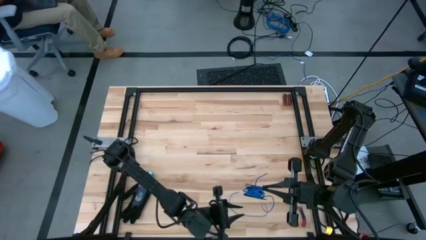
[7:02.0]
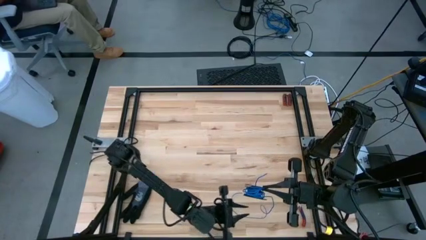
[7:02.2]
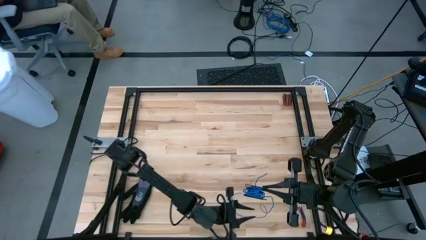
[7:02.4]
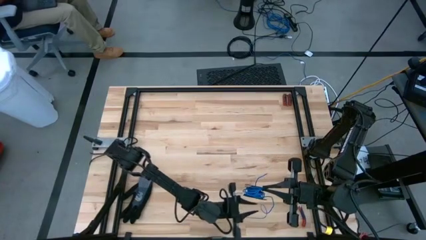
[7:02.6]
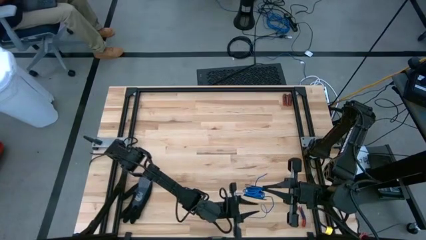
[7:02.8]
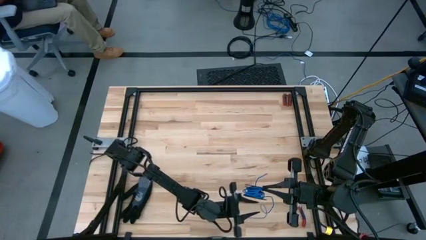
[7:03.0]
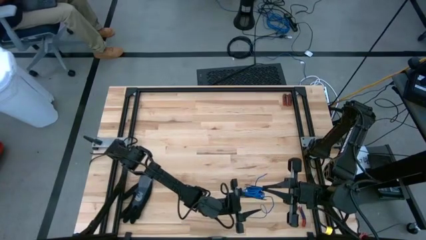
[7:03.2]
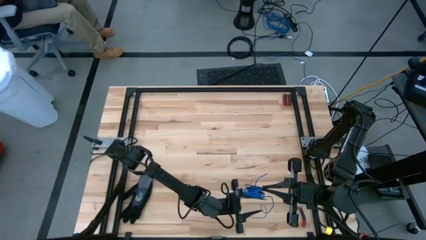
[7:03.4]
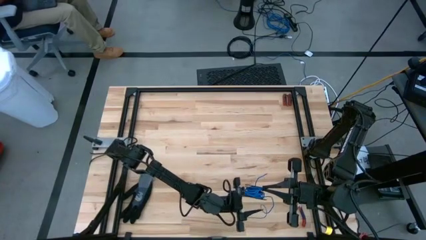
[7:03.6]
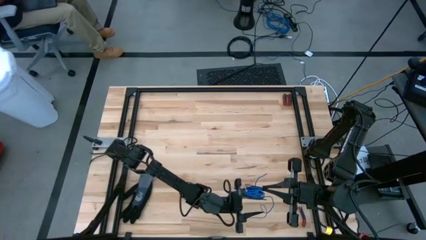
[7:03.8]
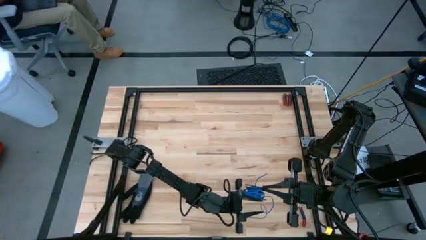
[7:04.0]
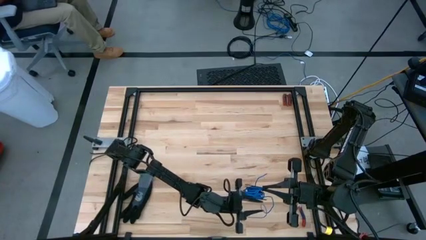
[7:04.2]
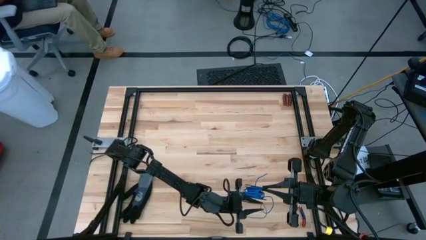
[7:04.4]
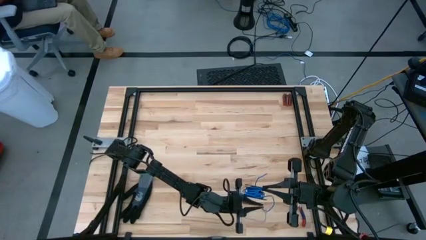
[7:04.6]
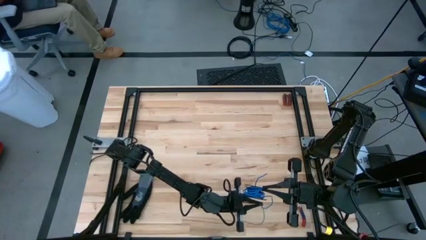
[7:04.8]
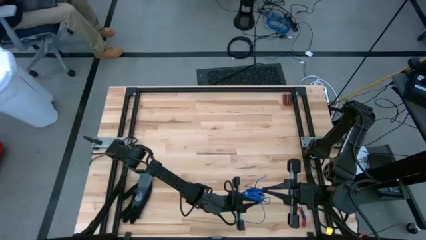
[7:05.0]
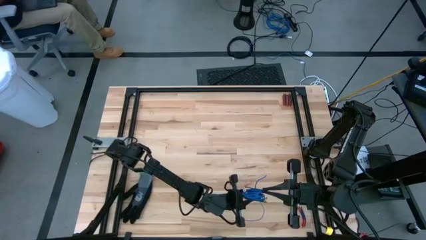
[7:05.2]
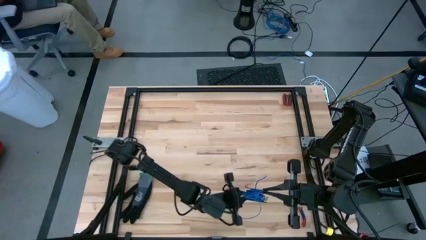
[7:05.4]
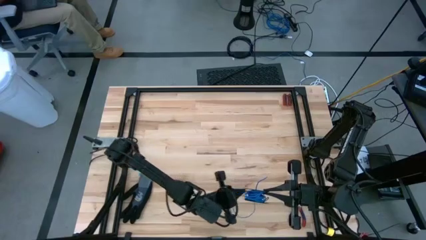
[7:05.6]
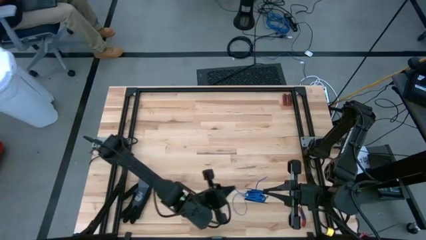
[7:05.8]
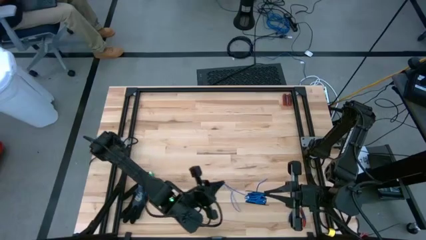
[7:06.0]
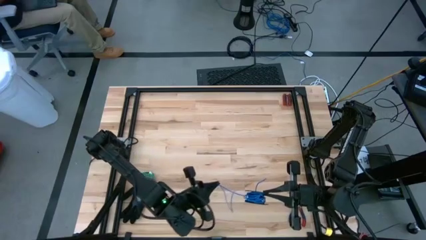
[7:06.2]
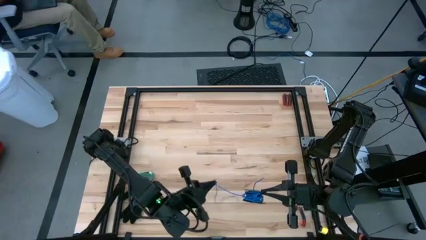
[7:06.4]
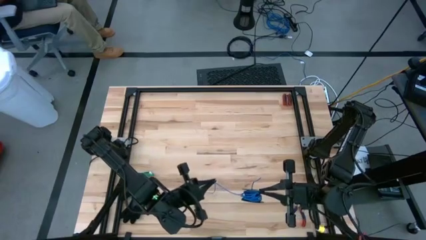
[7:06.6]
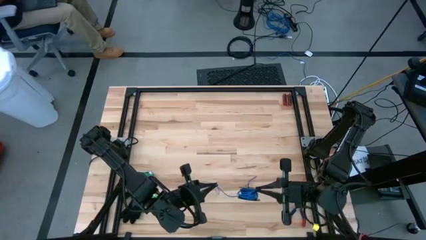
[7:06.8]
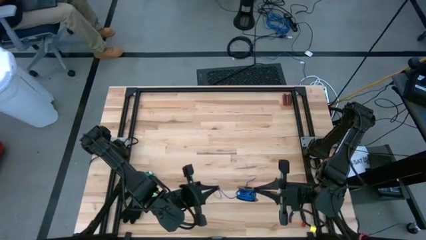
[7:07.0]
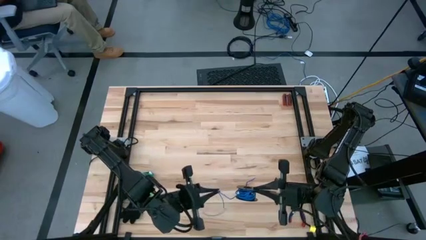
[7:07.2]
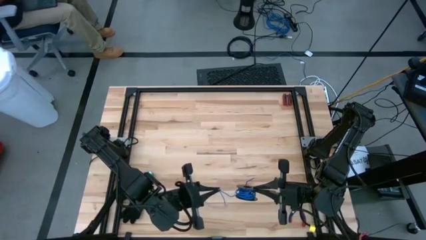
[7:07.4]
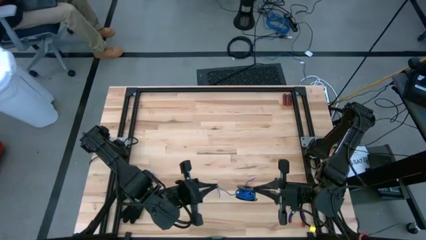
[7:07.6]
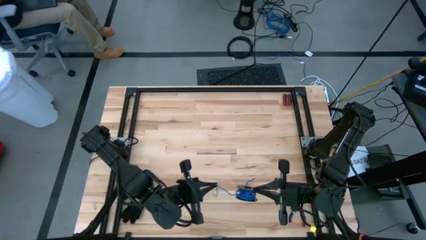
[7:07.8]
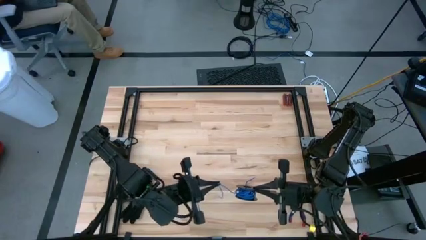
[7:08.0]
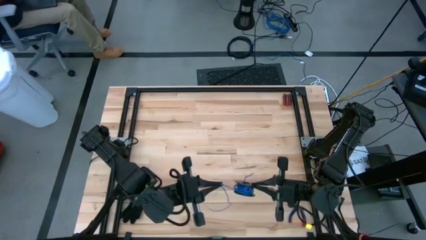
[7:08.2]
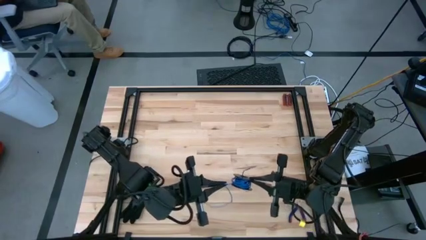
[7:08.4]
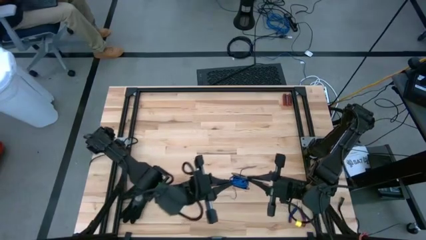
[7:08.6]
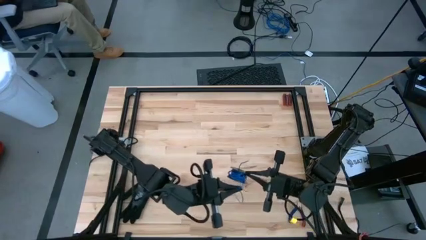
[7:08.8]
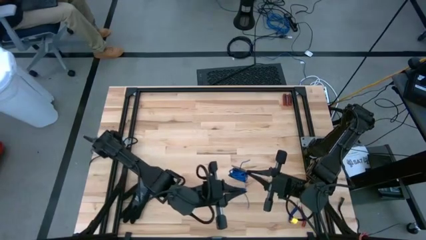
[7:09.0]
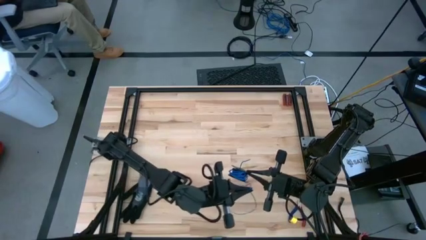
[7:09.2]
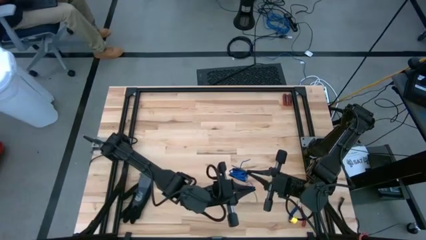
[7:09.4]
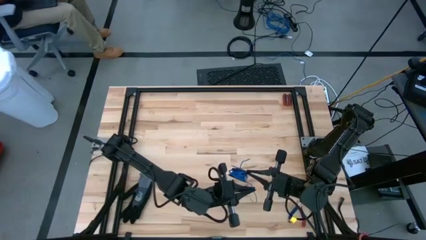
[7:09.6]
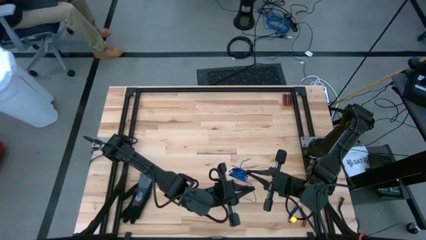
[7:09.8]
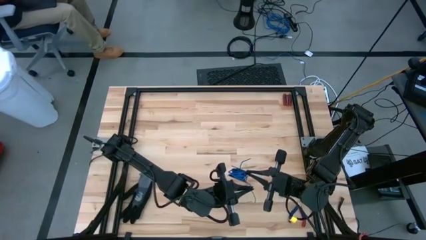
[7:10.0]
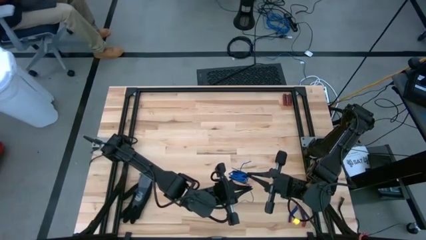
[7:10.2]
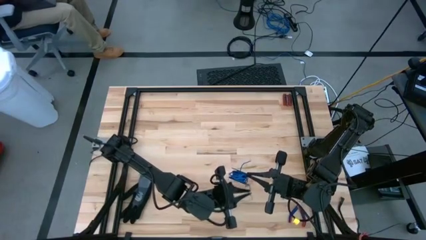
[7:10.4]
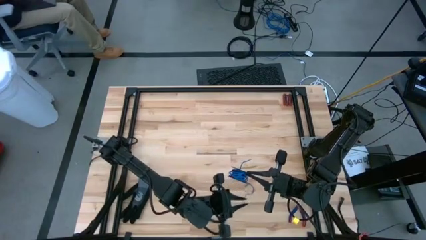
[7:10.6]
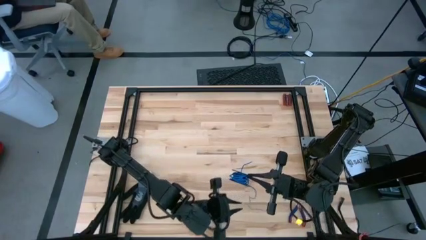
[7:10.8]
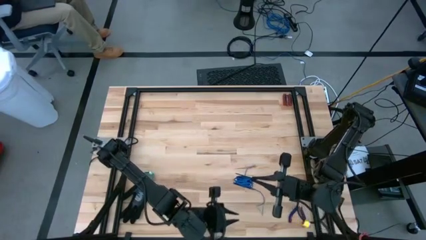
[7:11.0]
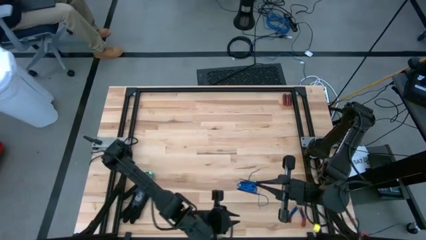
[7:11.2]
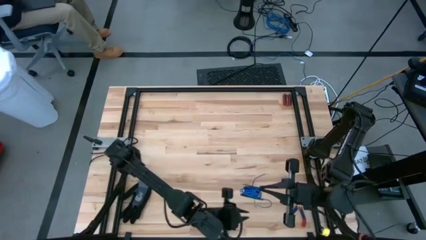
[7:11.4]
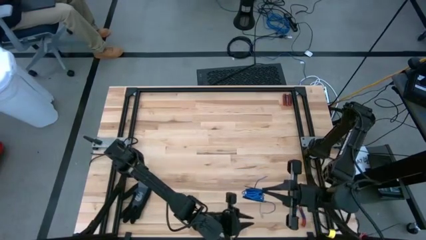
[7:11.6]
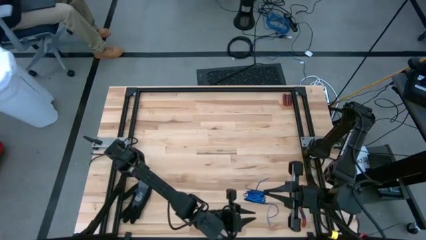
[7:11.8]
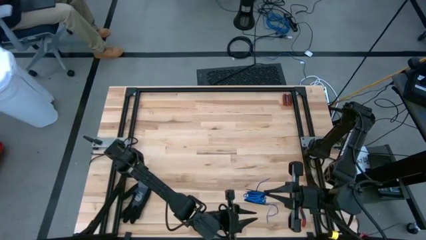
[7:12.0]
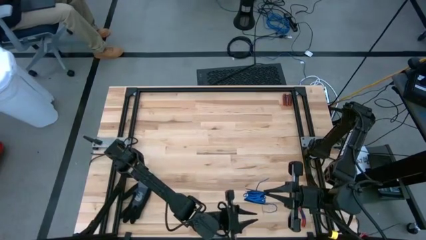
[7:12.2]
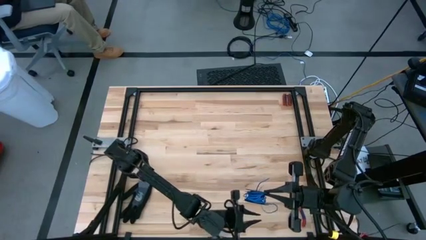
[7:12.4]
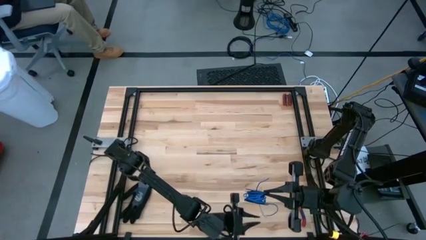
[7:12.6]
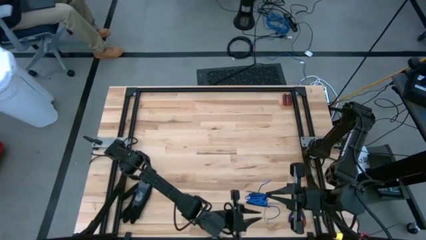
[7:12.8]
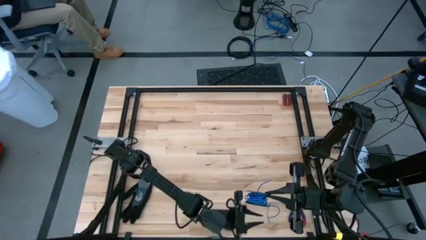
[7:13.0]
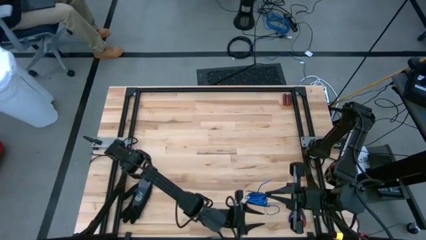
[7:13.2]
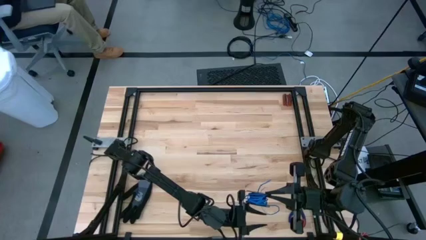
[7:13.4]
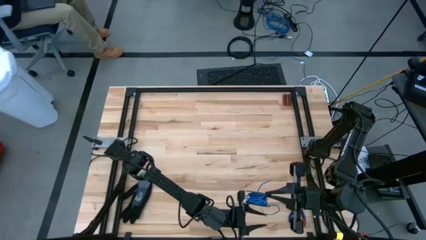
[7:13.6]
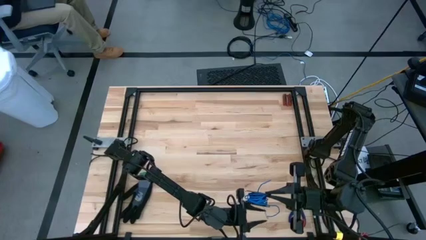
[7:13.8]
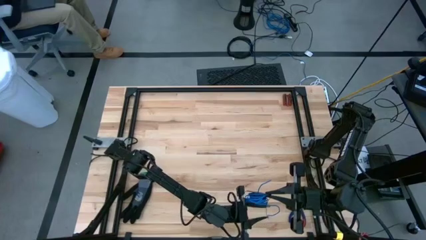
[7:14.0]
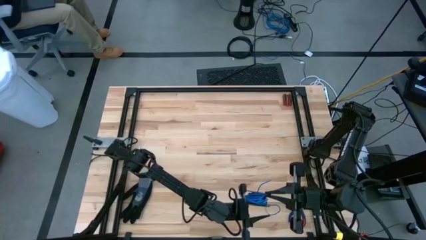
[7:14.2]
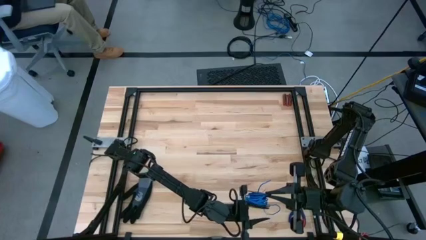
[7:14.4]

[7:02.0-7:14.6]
Task: Coil cords
Coil the blue wire onto the spool

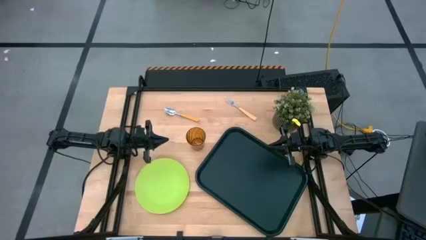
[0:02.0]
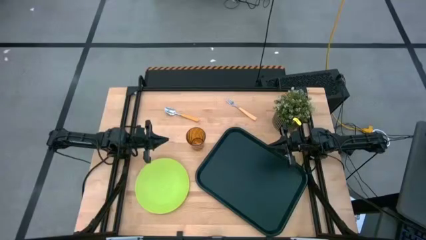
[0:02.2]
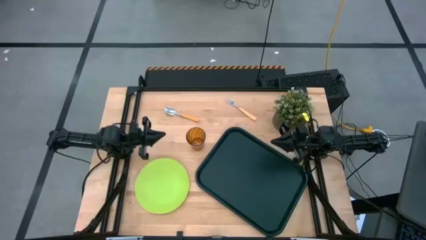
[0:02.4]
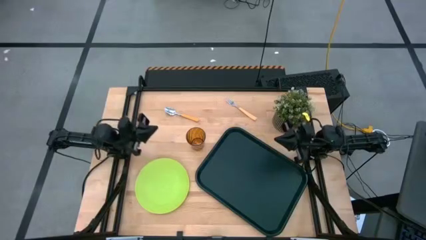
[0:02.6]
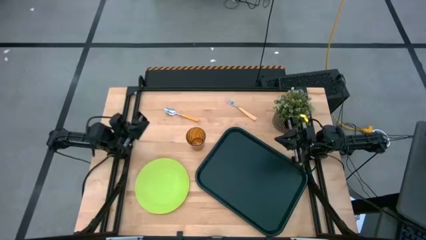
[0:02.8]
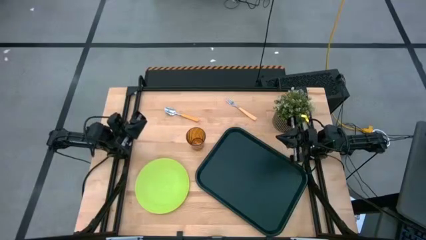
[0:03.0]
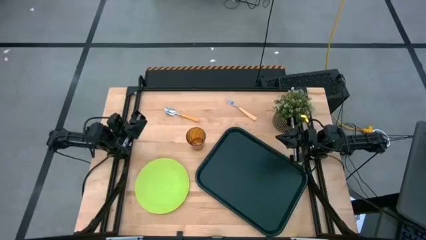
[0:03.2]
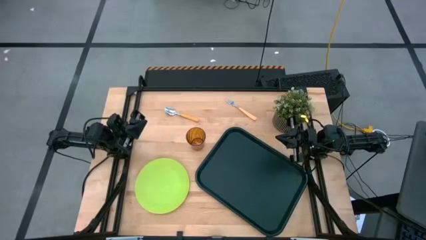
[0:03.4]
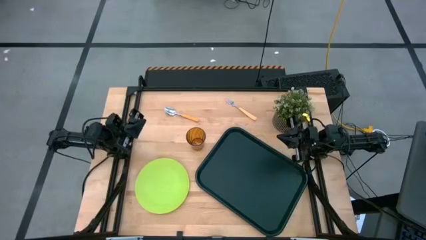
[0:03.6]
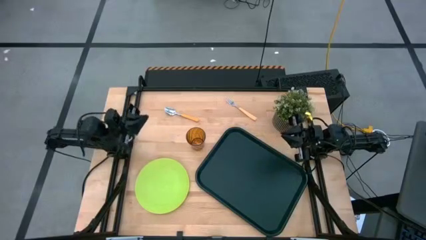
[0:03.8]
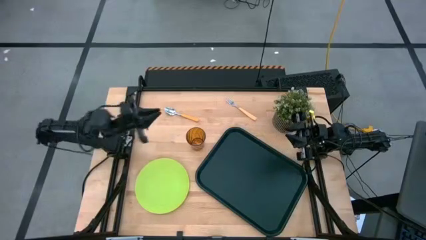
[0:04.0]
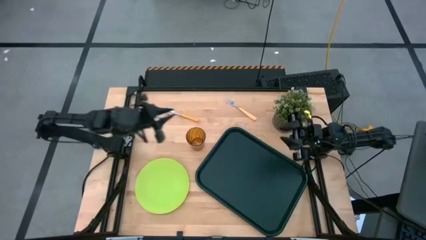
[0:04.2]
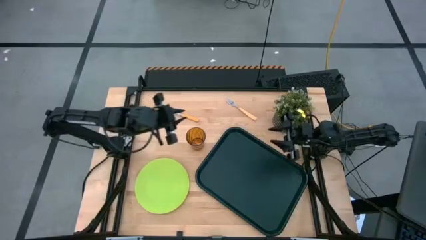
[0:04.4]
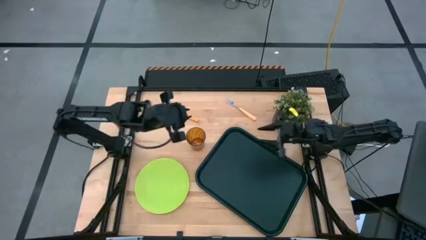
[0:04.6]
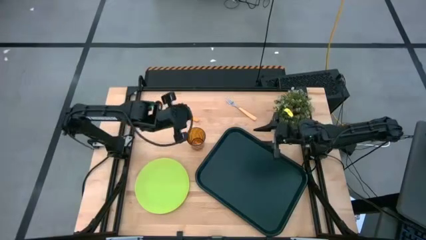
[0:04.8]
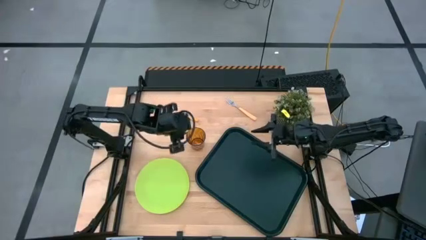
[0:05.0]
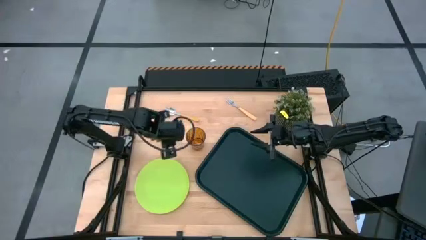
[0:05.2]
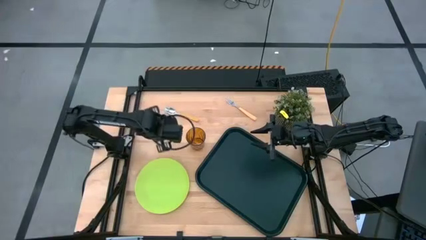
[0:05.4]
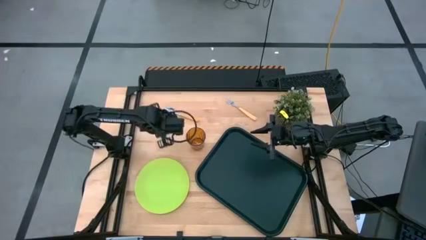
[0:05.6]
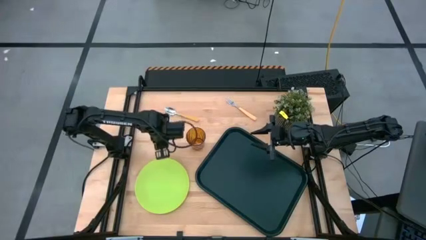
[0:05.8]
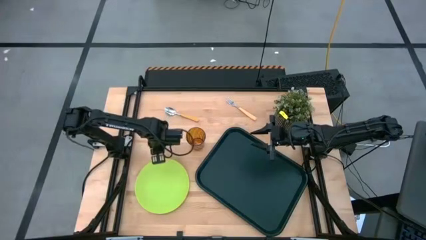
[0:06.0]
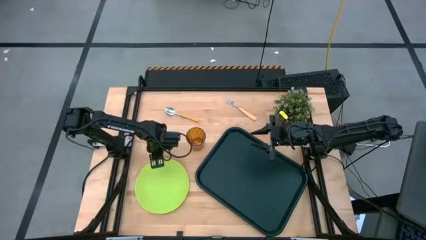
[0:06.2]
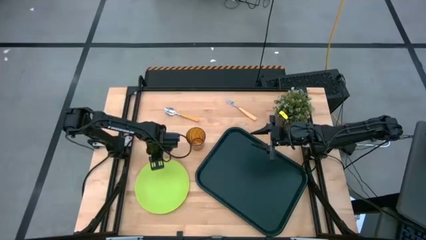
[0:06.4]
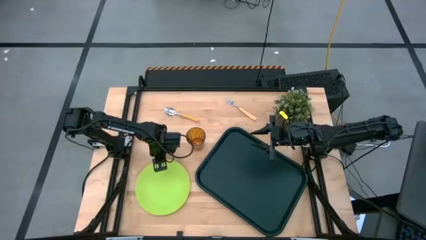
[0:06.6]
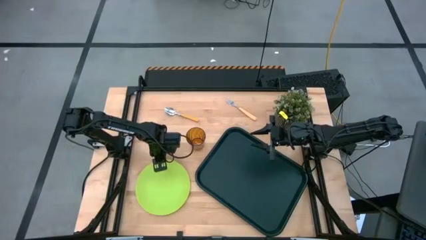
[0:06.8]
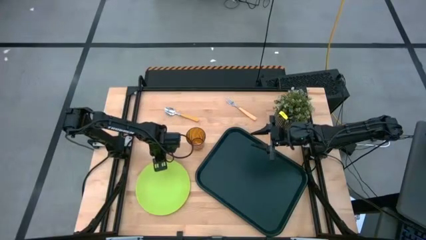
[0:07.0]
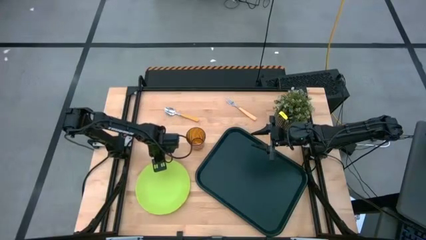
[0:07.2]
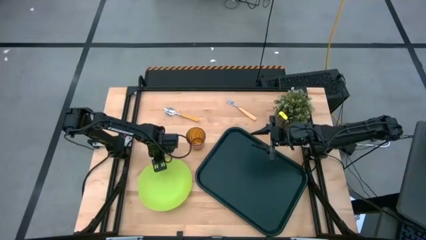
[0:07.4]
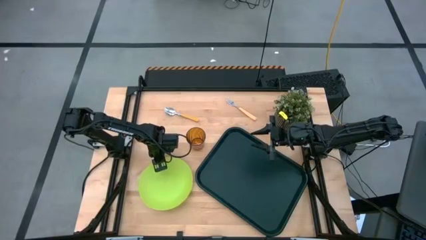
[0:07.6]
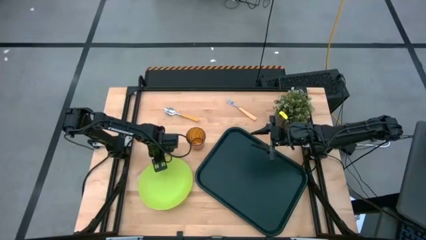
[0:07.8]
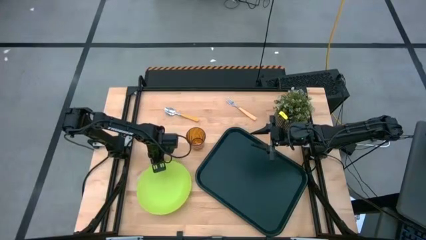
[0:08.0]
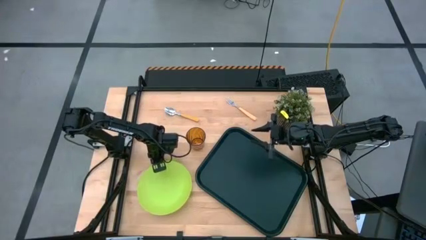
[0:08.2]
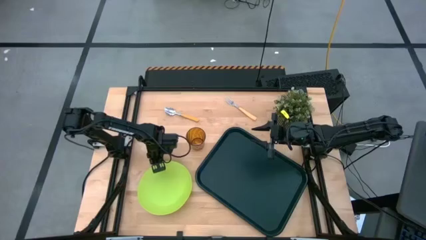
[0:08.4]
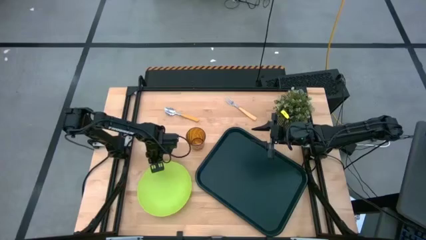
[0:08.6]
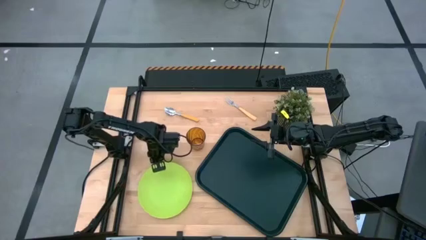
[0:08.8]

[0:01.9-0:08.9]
Task: Pick and place plate/cup/fork/spoon on tray
Put the green plate on the center of the black tray
